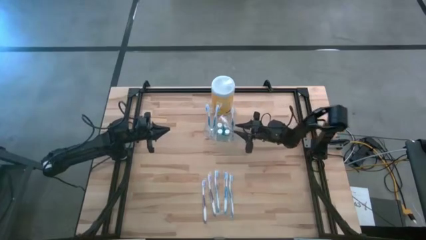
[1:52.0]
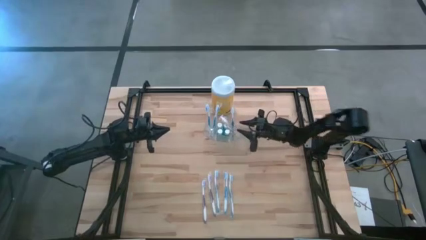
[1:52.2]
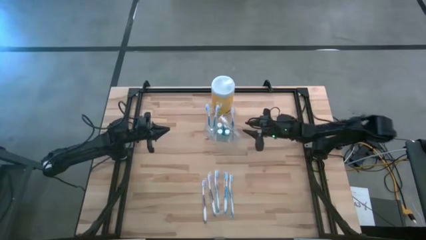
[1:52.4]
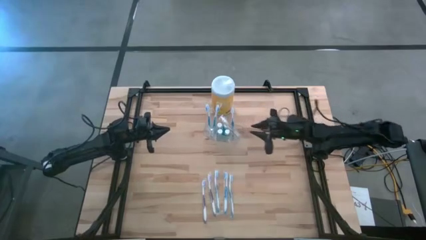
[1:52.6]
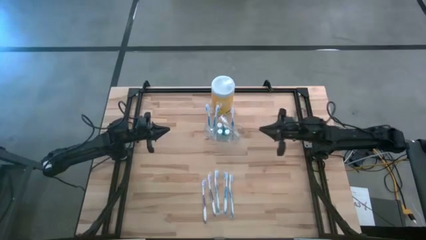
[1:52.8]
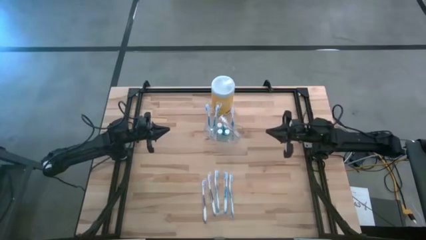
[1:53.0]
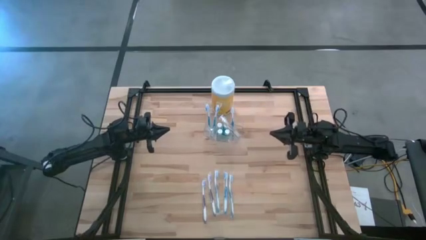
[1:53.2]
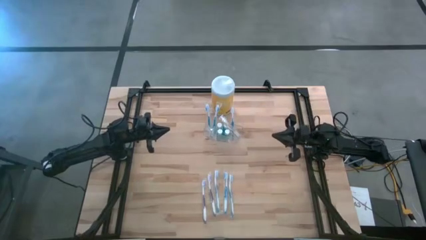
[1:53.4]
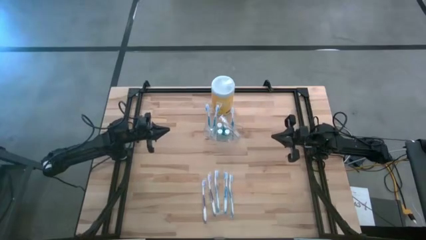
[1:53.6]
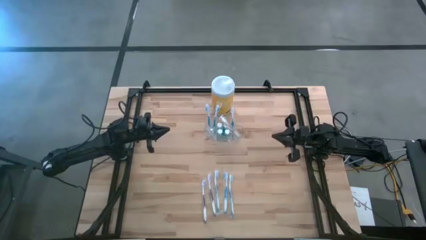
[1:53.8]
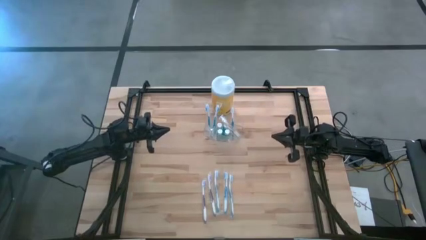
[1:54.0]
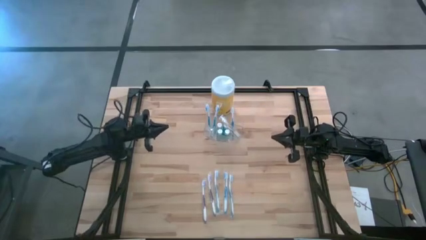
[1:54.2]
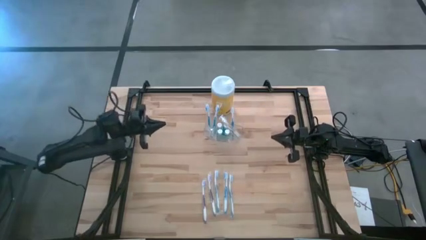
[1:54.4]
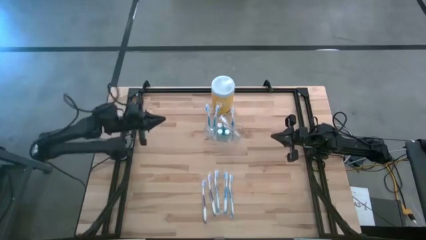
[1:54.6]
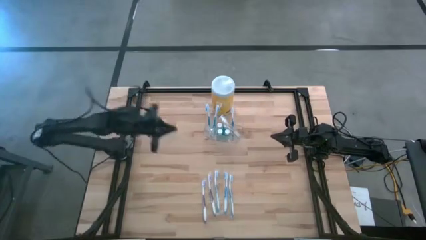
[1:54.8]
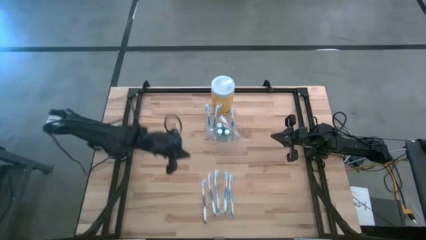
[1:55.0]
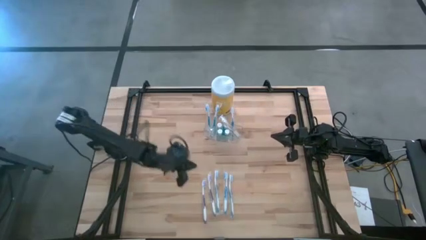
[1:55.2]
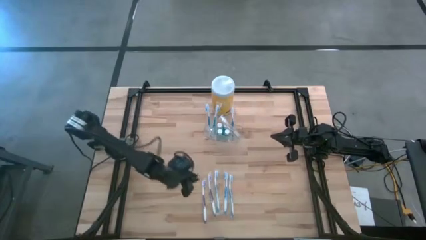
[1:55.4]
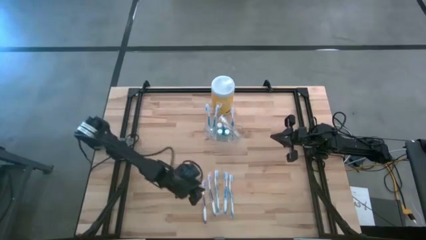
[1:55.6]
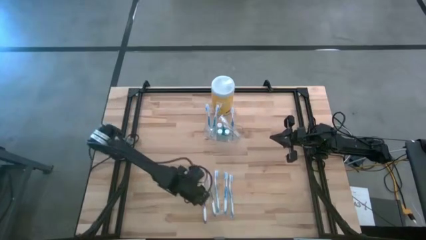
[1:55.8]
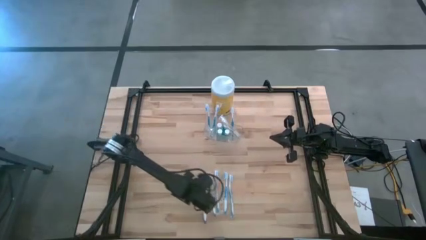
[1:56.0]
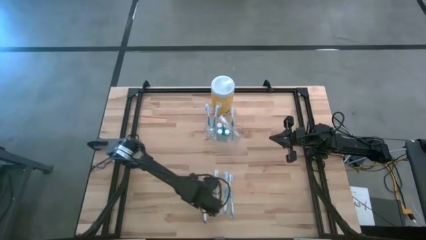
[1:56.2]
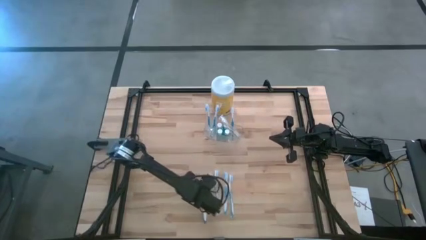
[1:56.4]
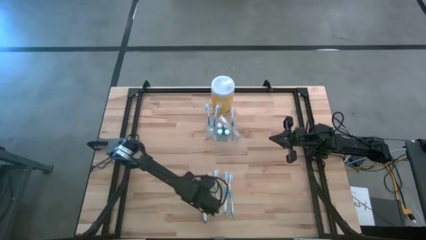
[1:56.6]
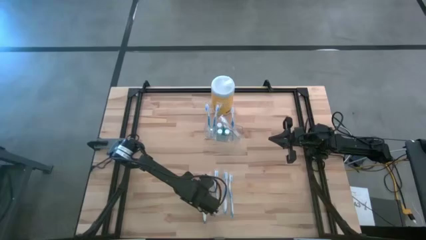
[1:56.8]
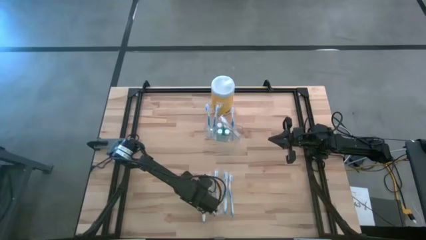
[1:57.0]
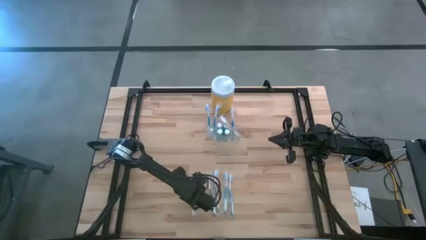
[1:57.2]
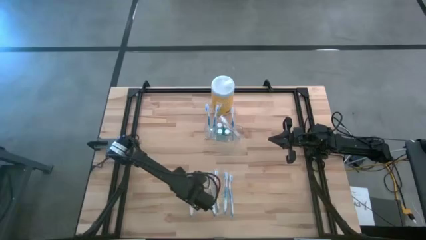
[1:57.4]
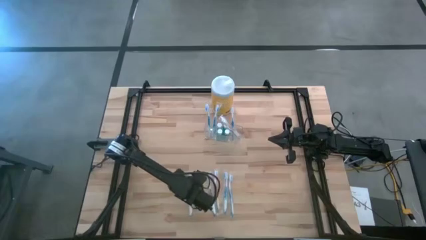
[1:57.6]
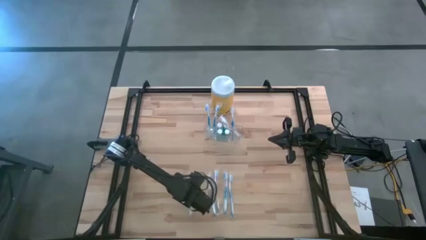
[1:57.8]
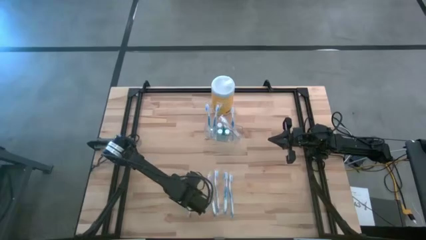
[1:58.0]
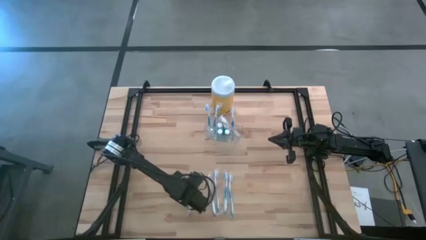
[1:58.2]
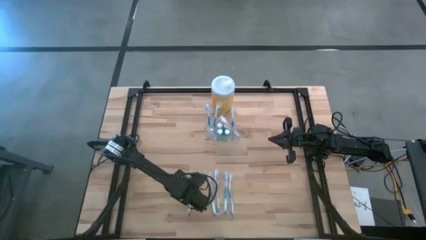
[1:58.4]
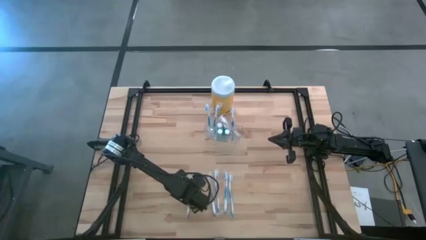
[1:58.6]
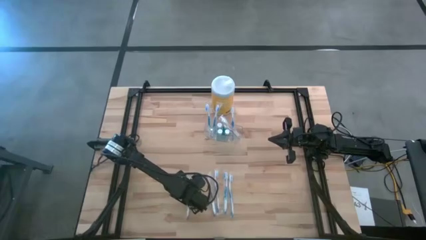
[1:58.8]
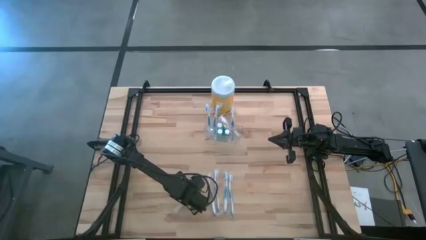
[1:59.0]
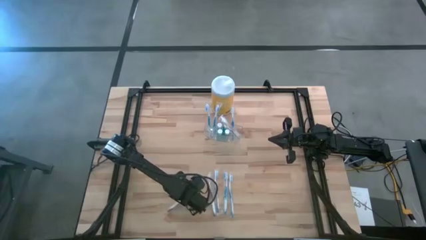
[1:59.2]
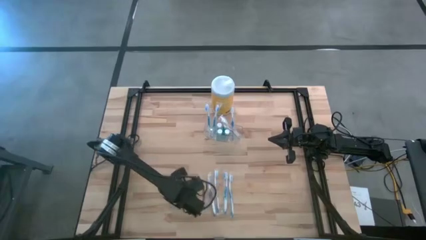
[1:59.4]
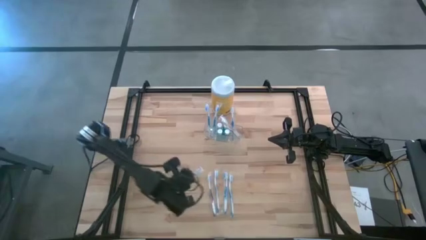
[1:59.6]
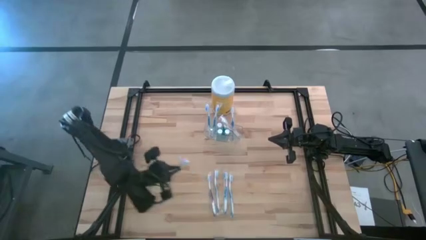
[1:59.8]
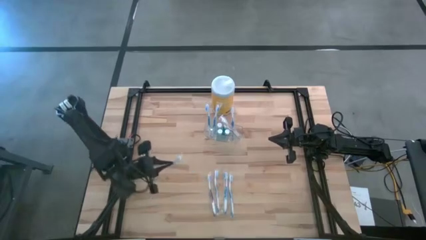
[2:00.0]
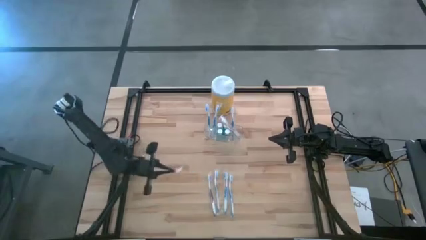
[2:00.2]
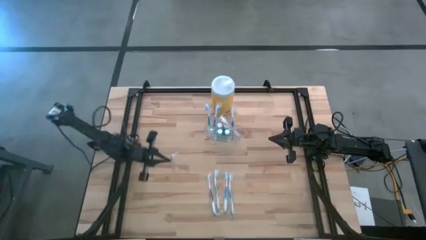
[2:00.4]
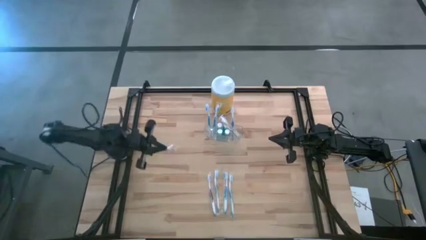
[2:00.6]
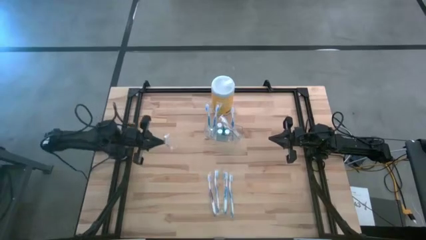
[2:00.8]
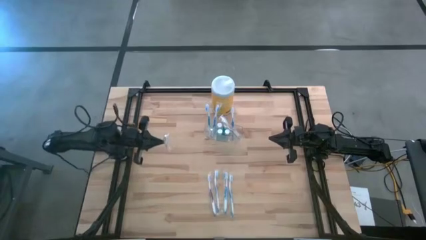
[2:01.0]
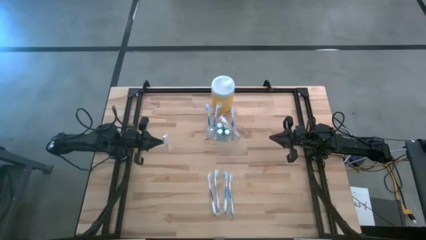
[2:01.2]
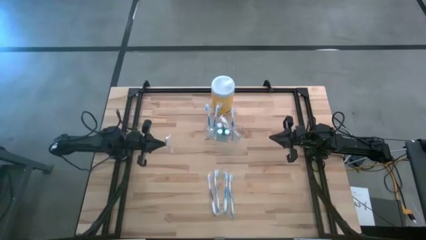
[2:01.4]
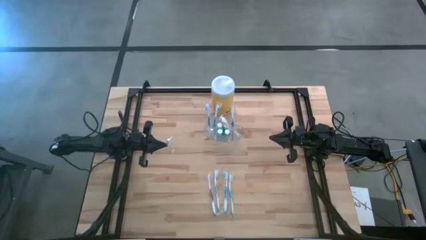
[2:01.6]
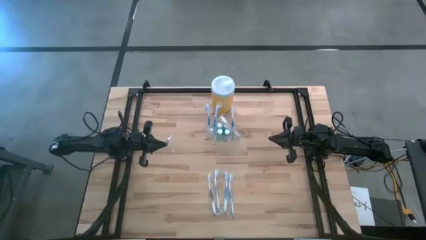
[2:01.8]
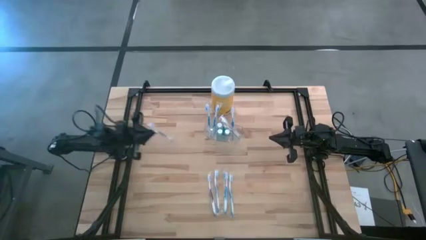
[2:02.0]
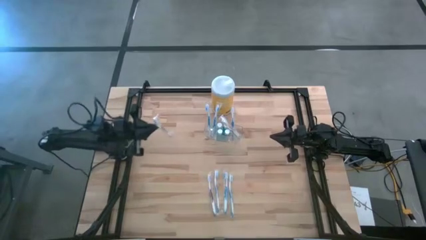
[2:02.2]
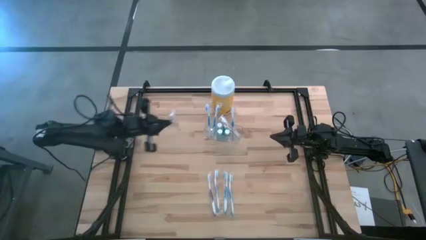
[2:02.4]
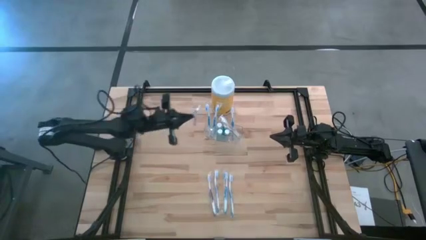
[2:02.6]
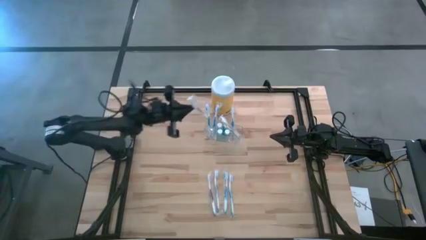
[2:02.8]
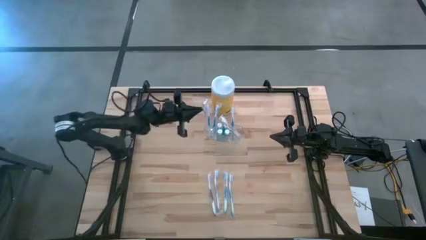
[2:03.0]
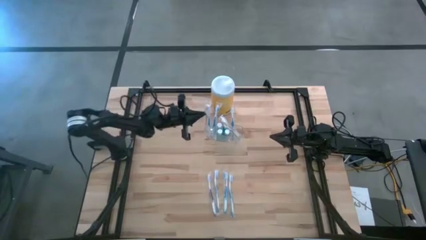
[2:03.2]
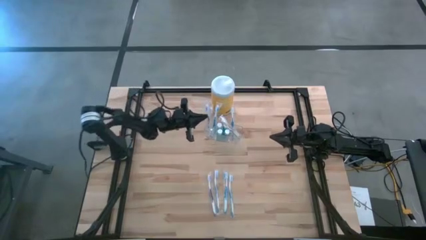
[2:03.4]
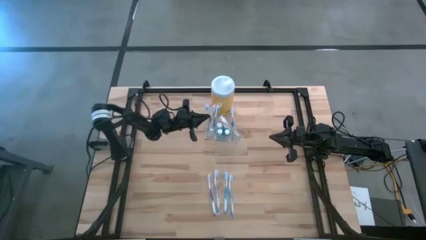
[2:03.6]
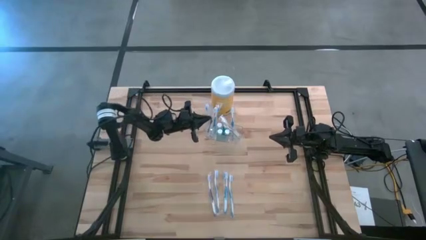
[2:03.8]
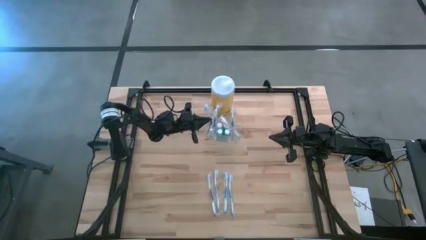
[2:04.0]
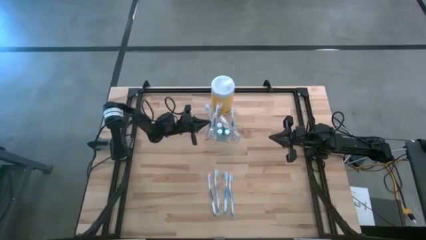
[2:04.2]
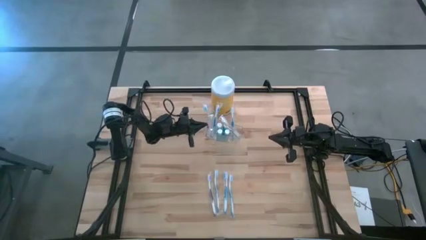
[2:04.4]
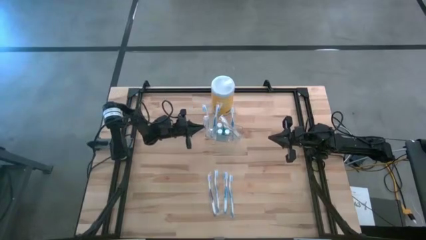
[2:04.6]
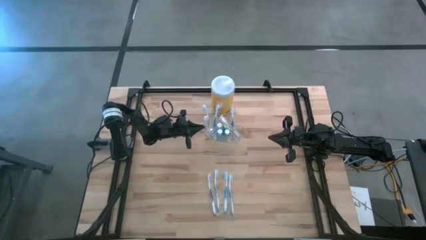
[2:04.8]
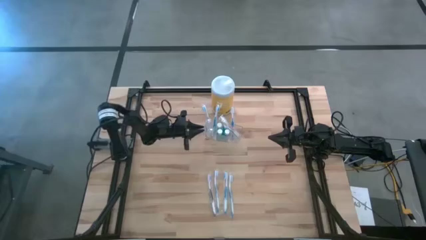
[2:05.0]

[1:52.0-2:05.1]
Task: Pick & Place toothbrushing station
Put the violet toothbrush into the transparent organizer

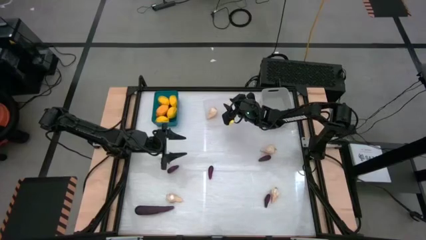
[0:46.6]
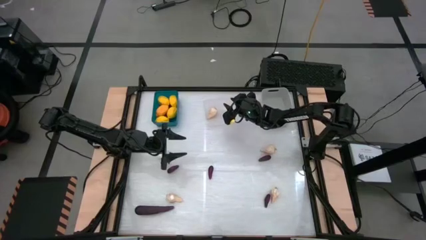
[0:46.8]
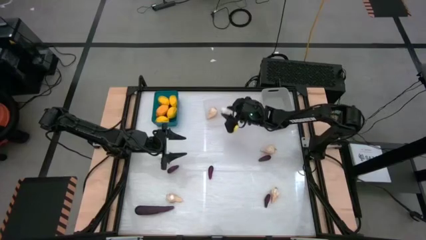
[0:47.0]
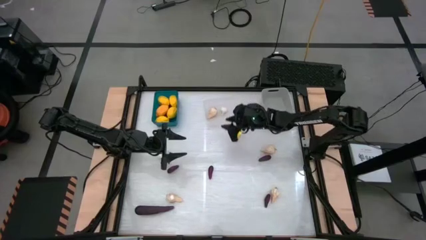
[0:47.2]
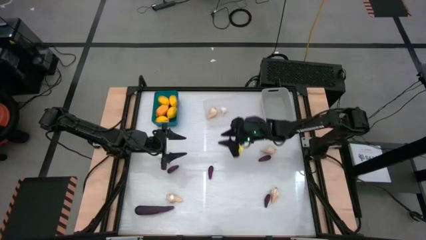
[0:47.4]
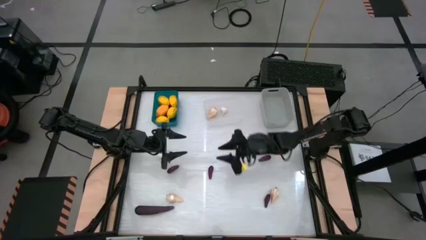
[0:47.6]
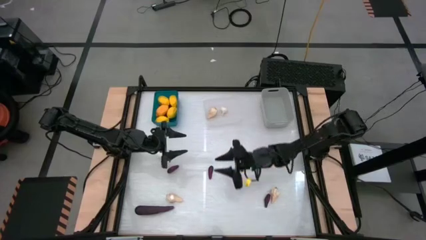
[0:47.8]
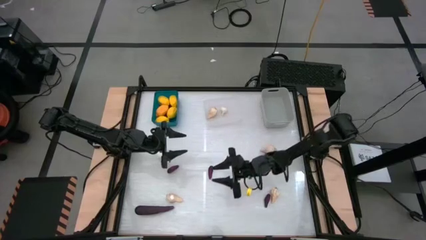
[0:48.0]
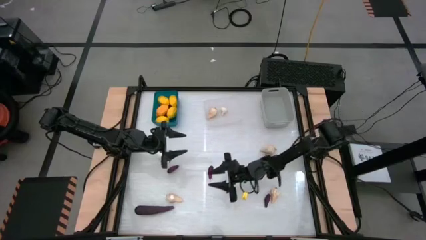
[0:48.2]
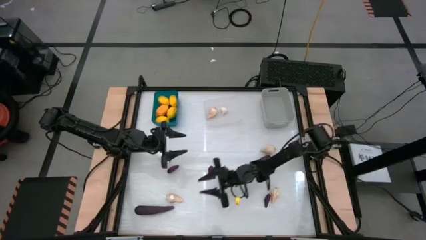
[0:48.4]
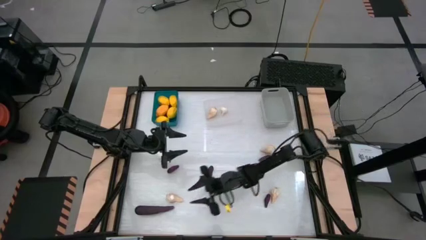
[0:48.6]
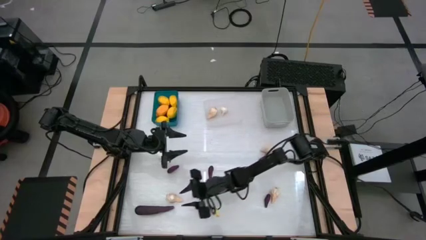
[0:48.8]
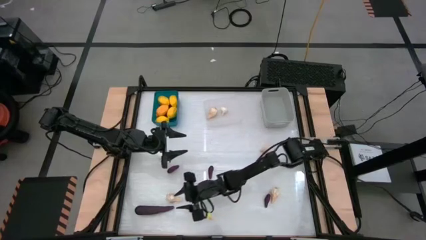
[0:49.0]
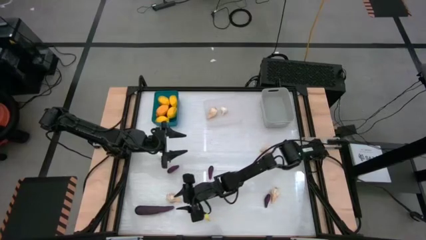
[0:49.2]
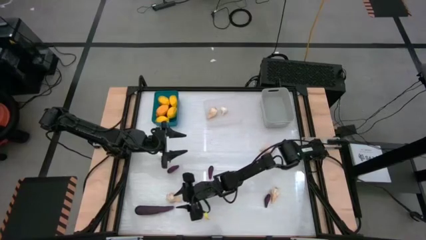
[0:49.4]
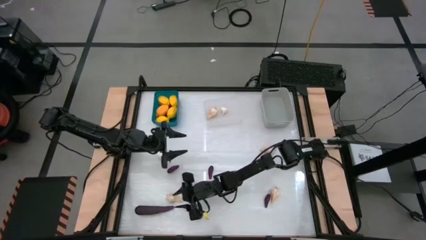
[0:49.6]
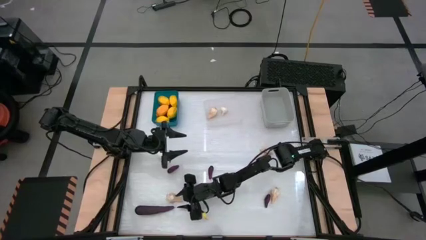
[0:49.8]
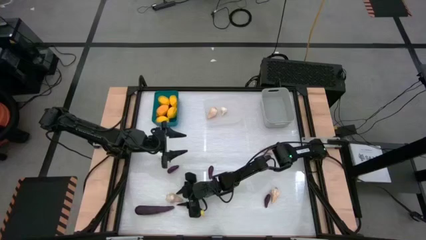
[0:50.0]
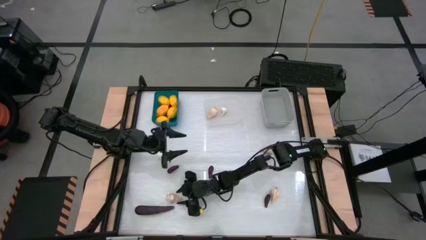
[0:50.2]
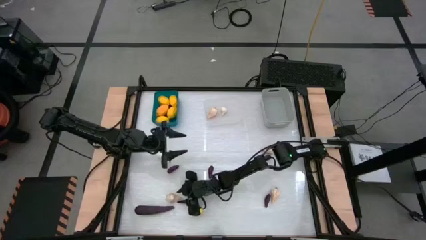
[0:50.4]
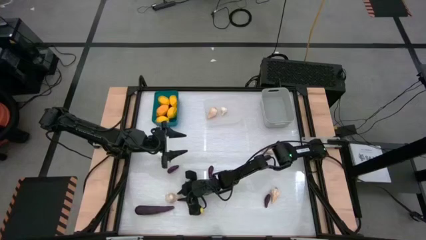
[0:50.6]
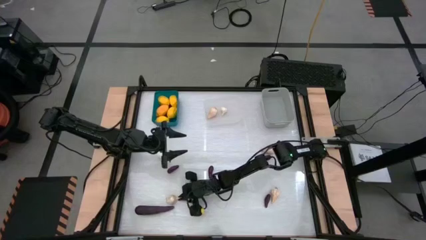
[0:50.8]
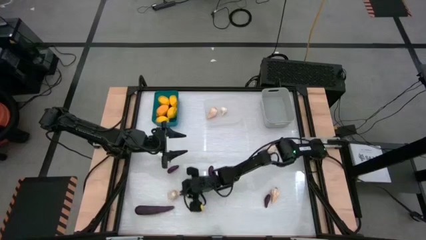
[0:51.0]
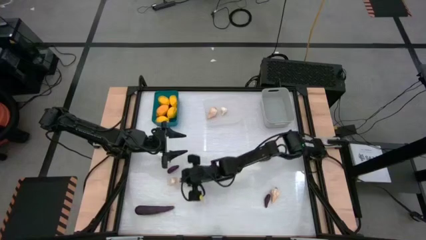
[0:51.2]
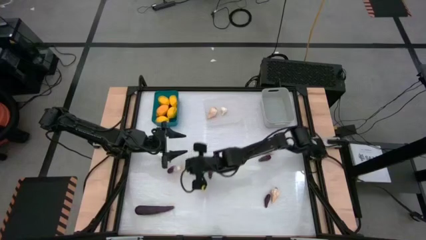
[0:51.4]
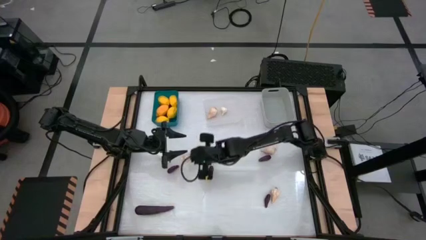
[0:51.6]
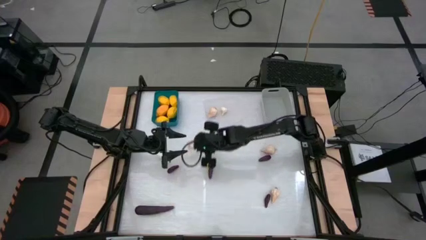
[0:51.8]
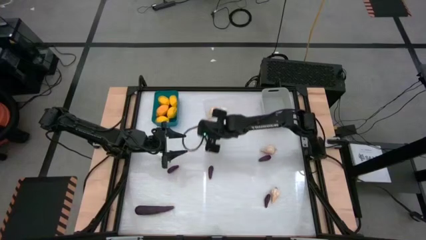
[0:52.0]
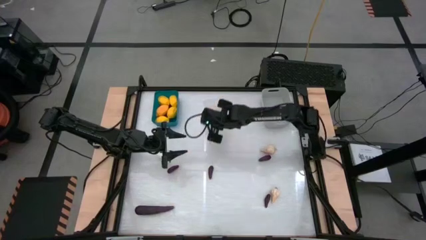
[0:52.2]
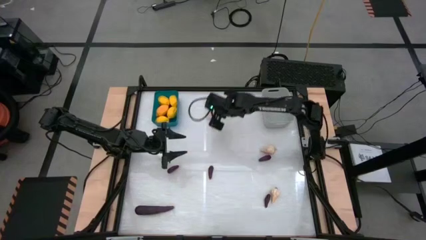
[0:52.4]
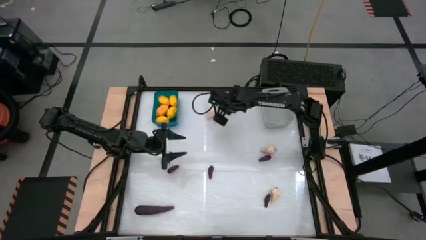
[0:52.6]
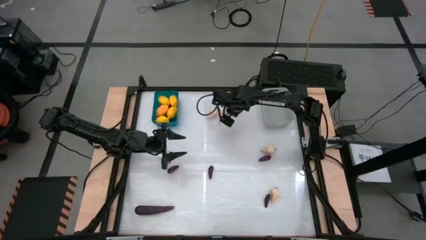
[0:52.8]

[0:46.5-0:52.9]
Task: Sort produce into baskets
Put the garlic into the transparent bin
